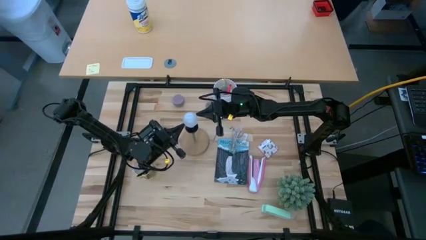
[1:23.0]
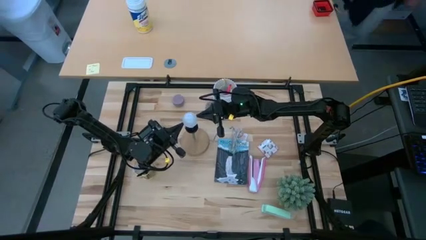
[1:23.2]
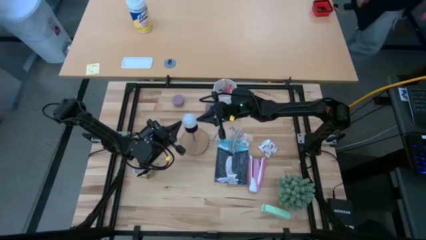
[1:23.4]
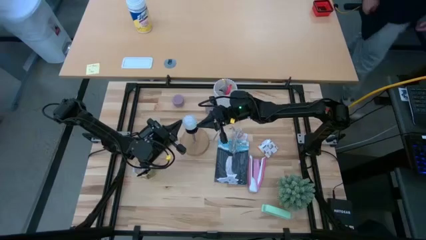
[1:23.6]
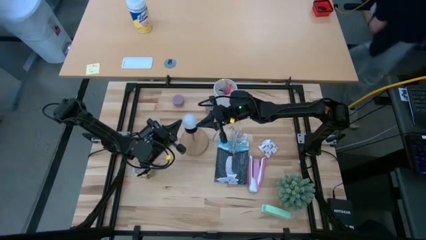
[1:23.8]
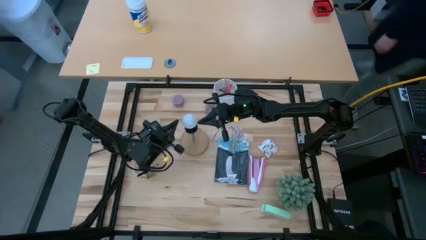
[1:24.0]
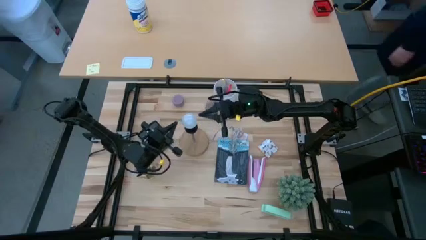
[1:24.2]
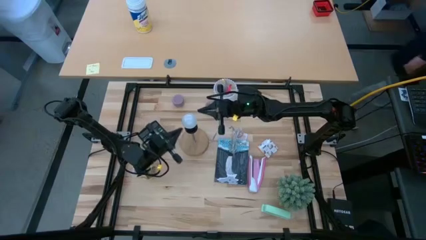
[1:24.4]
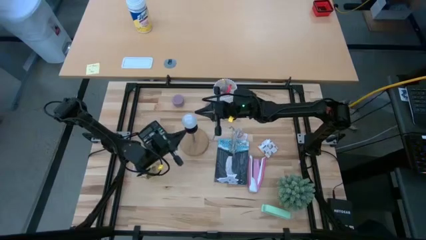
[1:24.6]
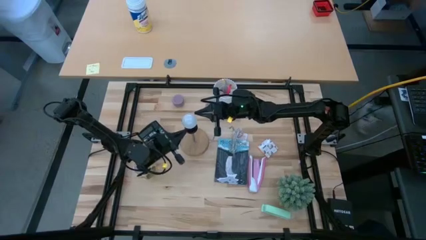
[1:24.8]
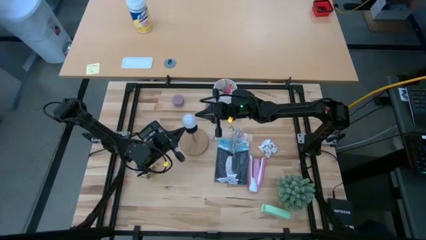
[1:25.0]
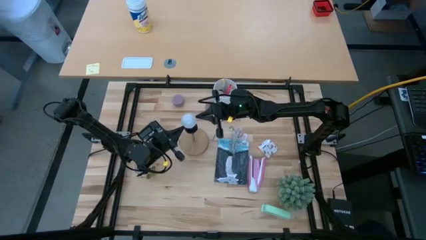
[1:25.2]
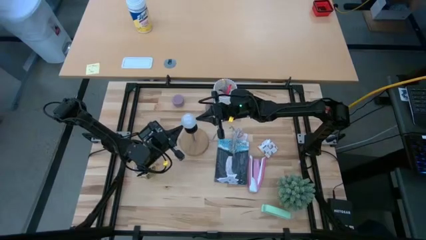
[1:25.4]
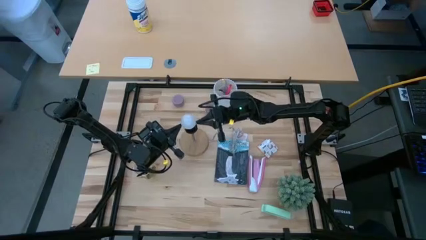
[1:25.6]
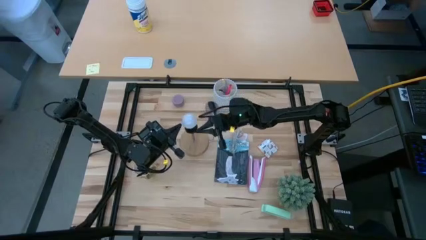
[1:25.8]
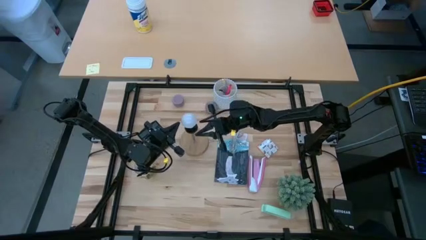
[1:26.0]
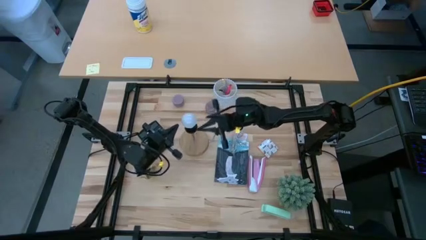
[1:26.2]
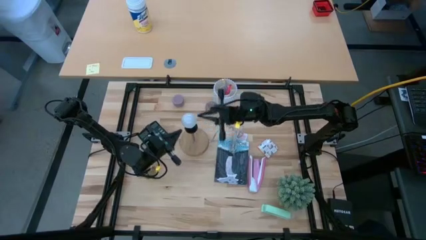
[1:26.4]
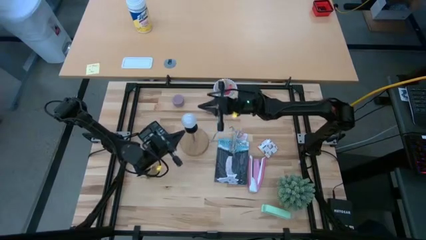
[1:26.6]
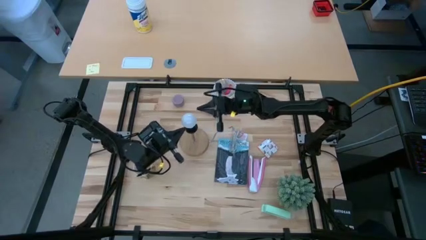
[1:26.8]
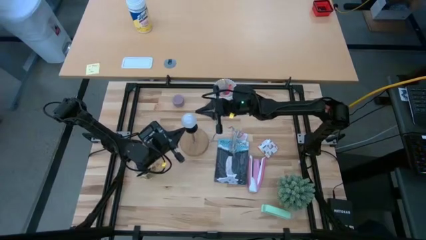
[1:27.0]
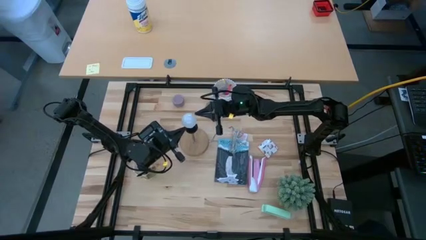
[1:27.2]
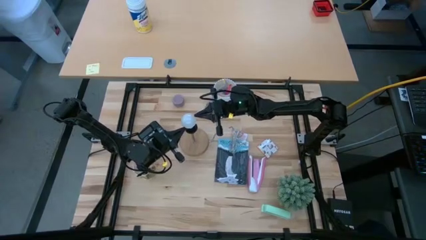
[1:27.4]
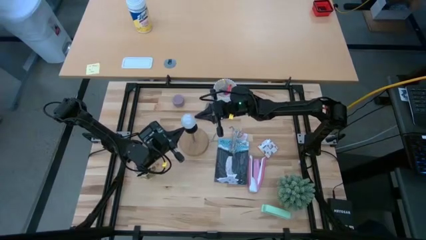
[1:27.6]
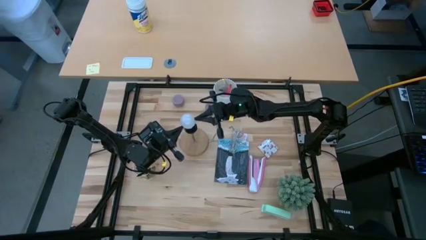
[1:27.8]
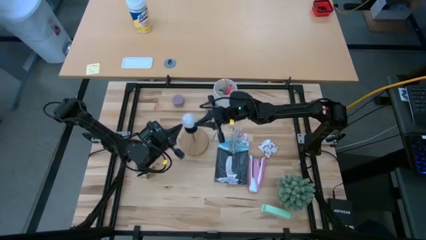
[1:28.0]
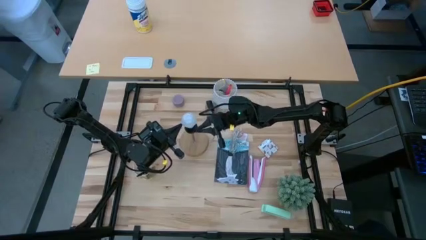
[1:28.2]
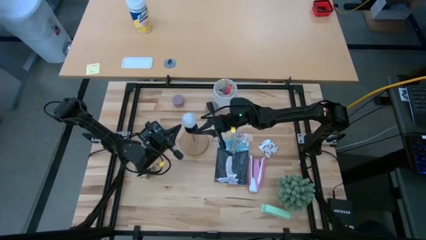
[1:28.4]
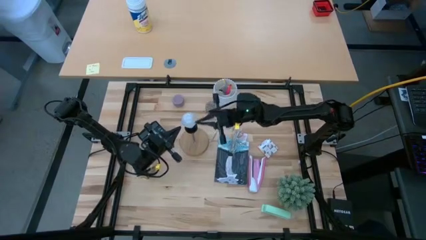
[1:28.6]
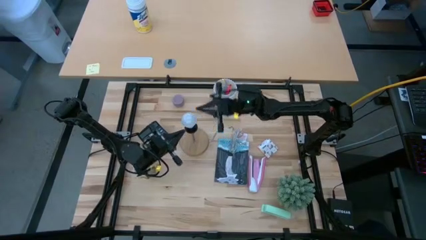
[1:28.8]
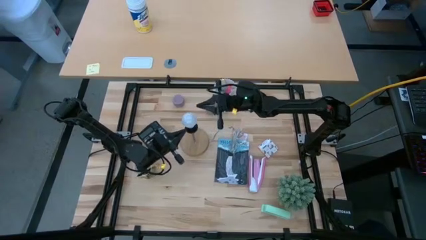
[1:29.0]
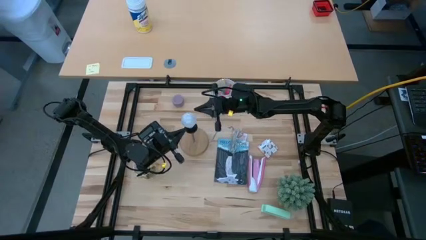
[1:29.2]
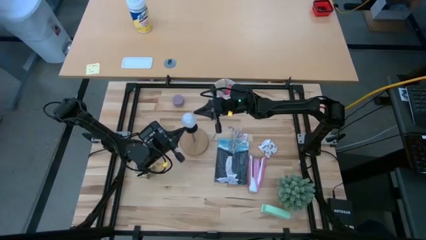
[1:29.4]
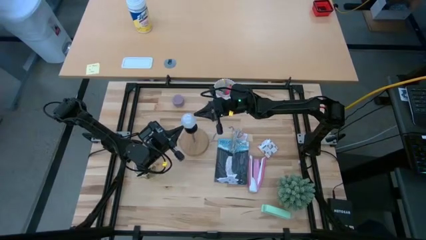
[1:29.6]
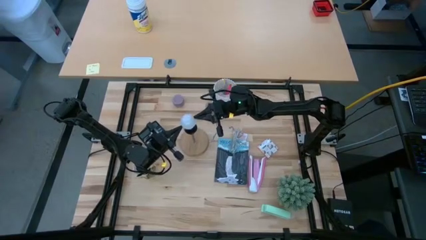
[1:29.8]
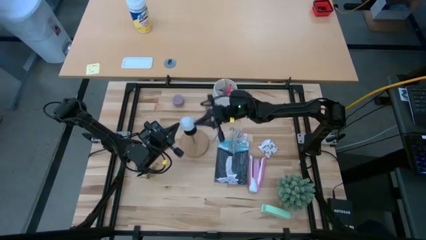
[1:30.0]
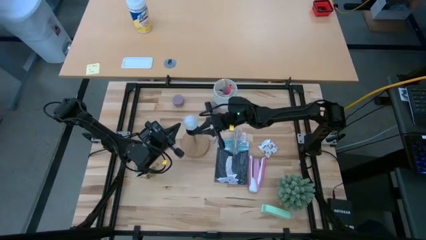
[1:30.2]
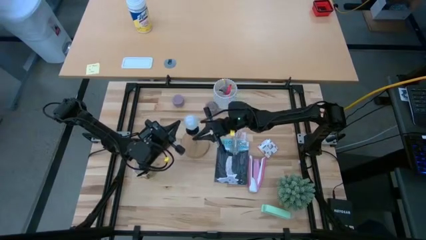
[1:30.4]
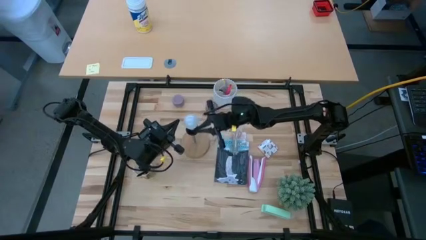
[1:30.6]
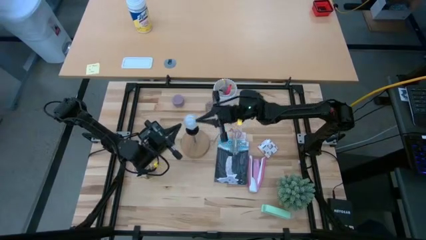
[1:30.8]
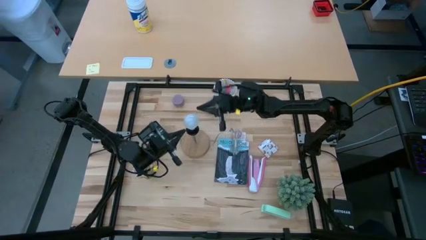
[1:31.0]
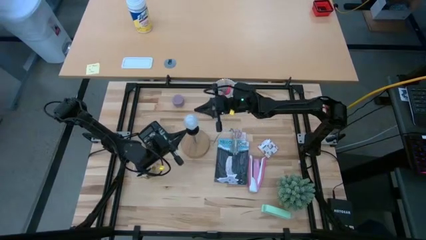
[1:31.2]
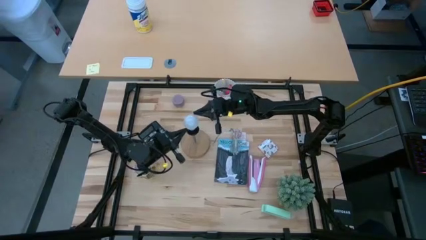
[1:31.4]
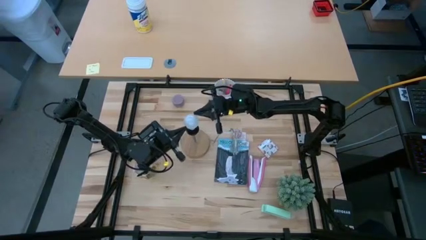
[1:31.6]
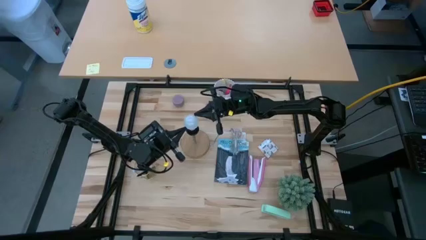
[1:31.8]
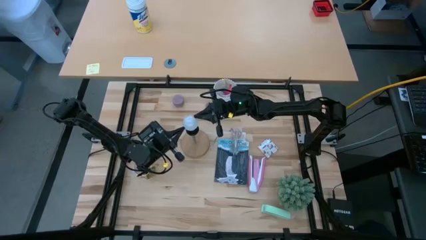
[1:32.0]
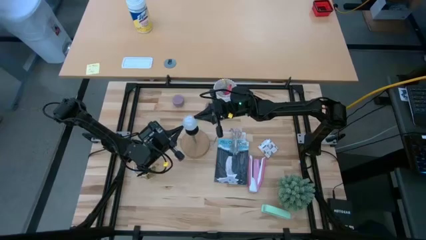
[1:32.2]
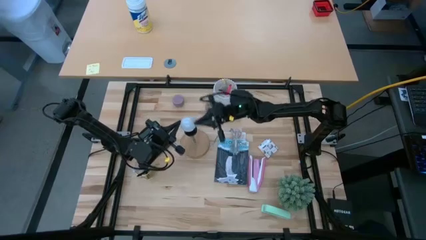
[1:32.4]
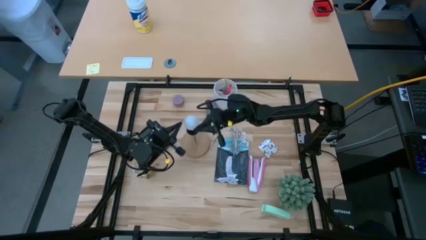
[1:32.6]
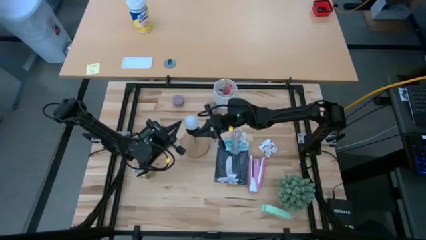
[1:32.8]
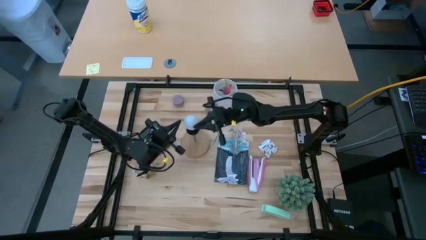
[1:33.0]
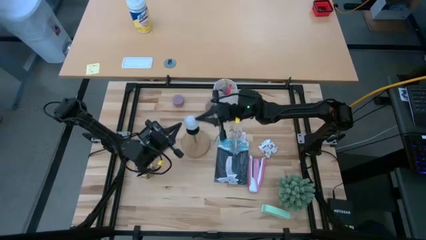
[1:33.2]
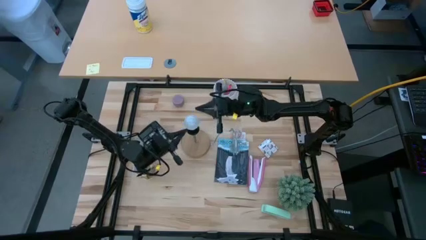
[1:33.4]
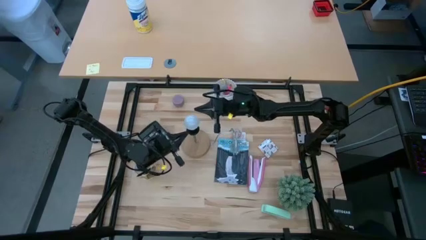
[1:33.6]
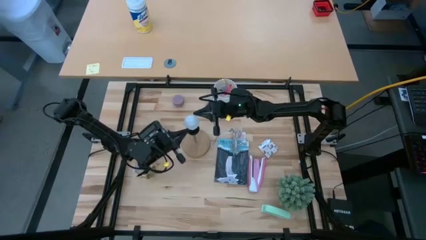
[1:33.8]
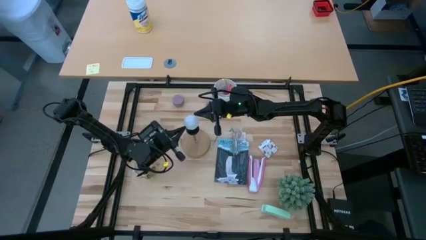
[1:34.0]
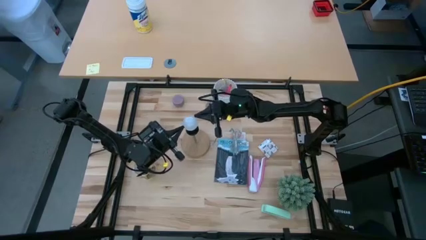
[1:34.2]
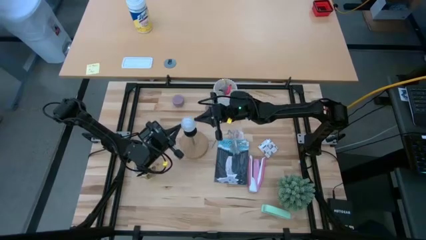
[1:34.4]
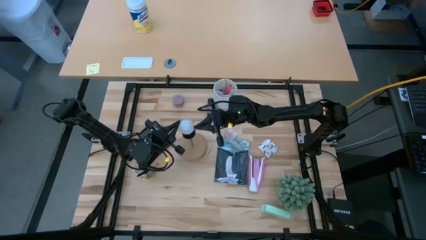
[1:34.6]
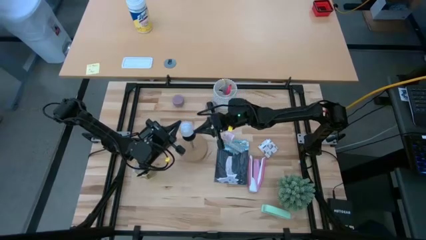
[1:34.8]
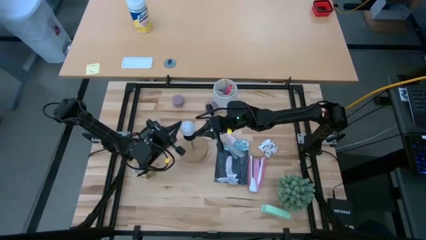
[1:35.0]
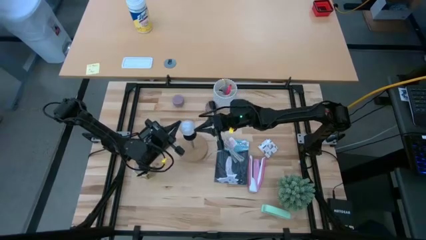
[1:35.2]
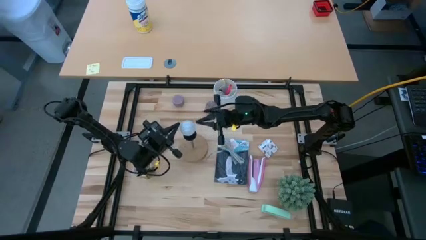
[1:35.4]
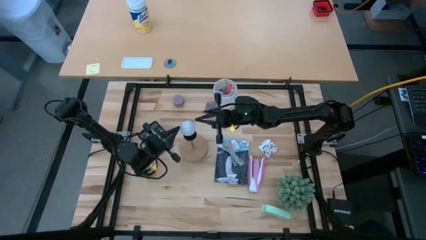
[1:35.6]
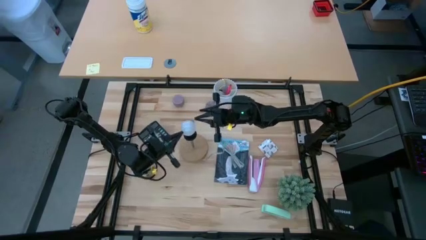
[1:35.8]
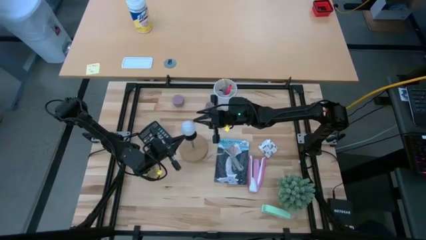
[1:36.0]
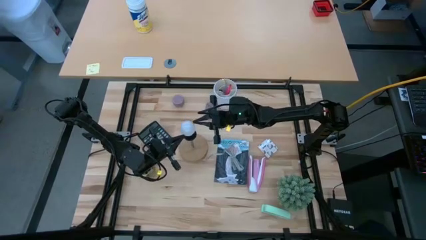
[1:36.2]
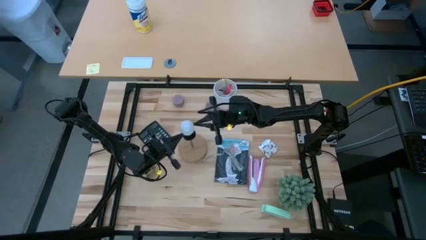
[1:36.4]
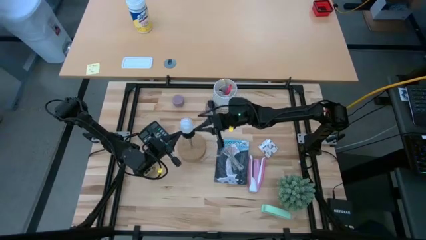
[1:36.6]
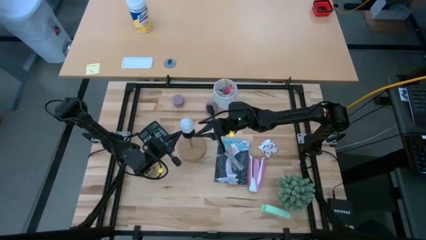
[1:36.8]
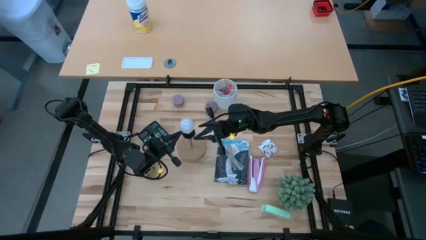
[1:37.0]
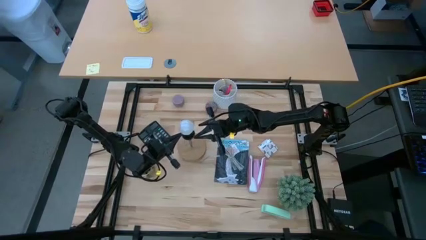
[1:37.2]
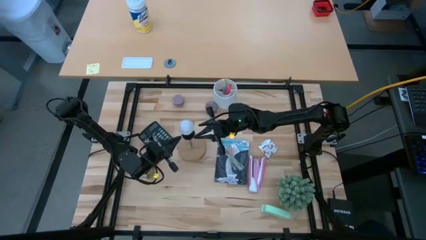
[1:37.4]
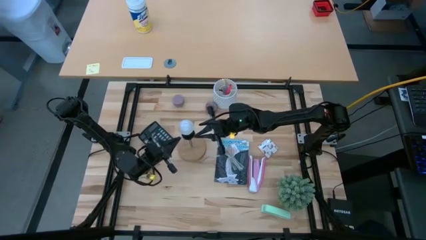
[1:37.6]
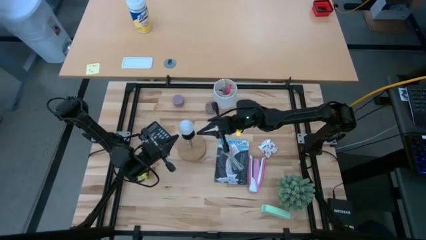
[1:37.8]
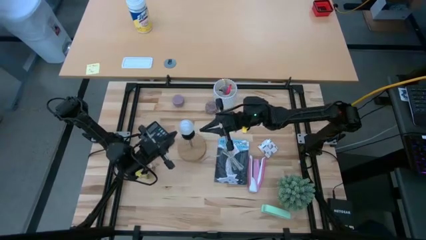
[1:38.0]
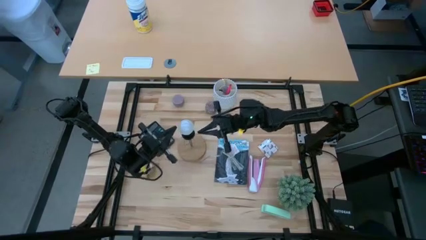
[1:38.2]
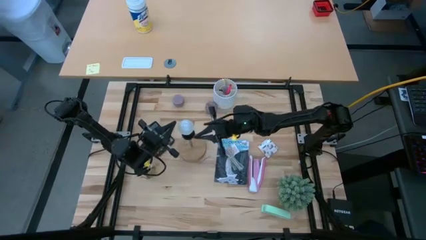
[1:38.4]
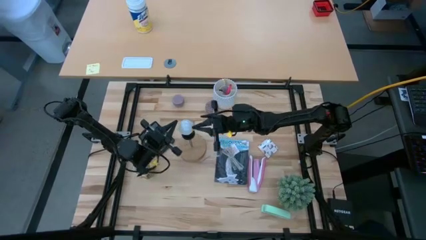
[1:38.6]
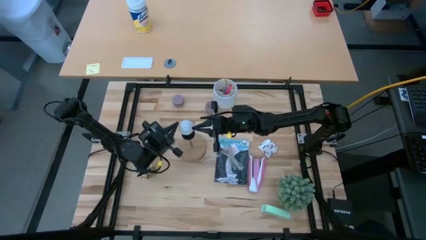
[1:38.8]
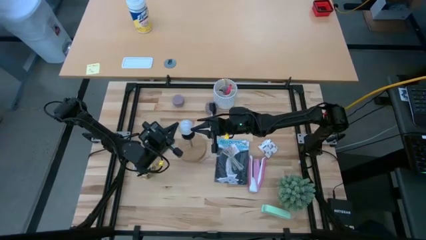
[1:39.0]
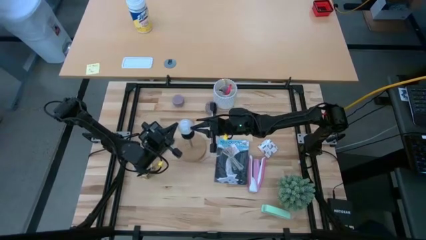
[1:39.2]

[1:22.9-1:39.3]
Task: Screw lightbulb
Insert the lightbulb into the lamp
